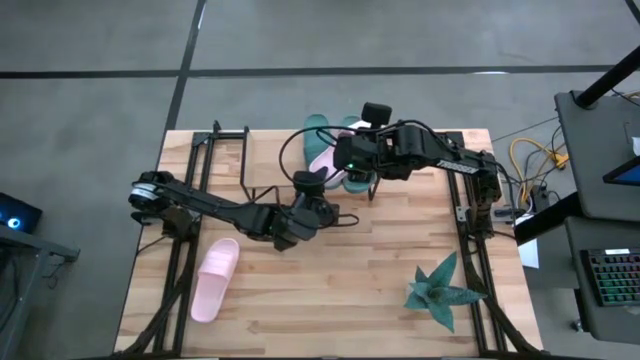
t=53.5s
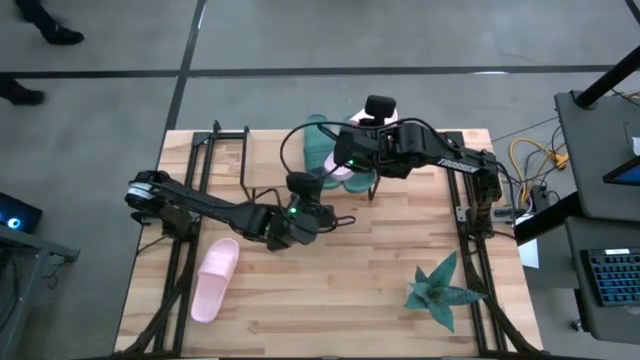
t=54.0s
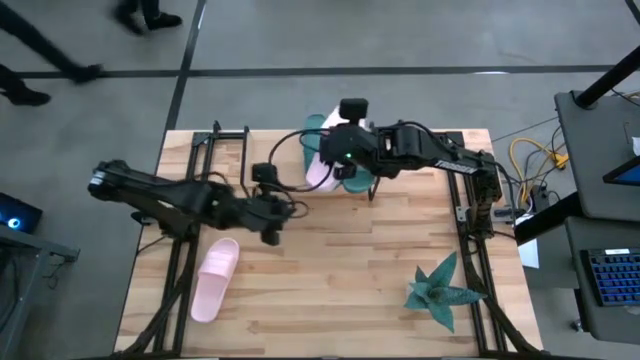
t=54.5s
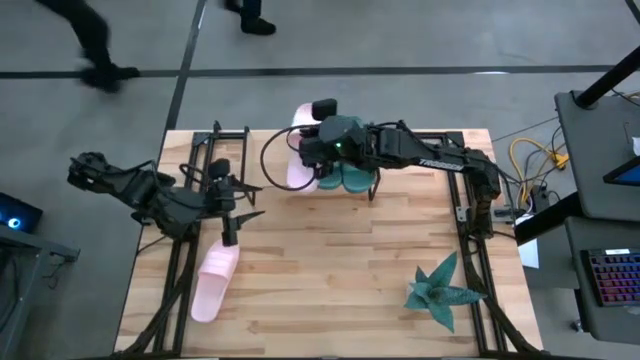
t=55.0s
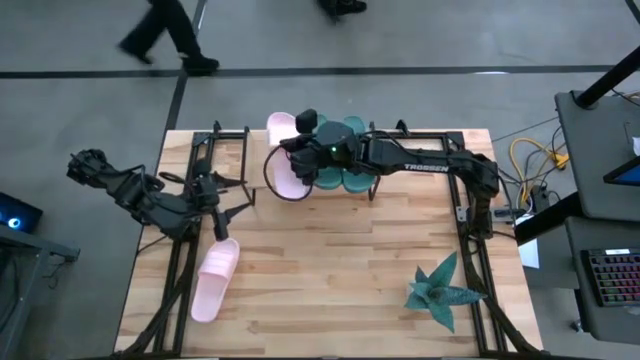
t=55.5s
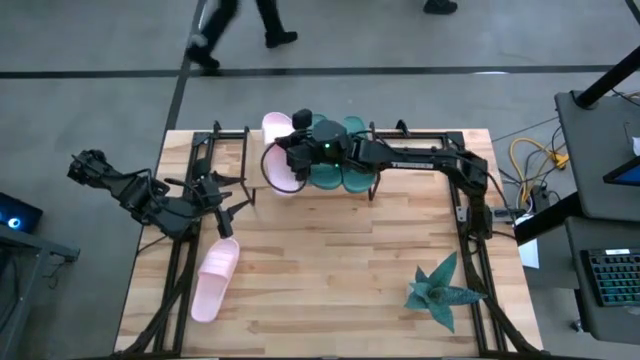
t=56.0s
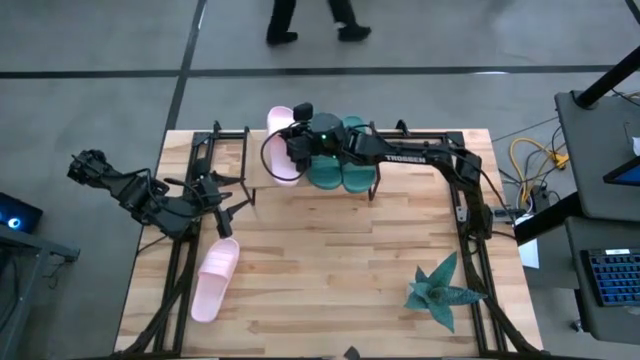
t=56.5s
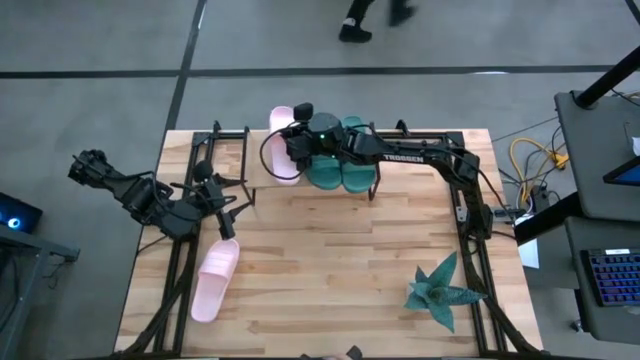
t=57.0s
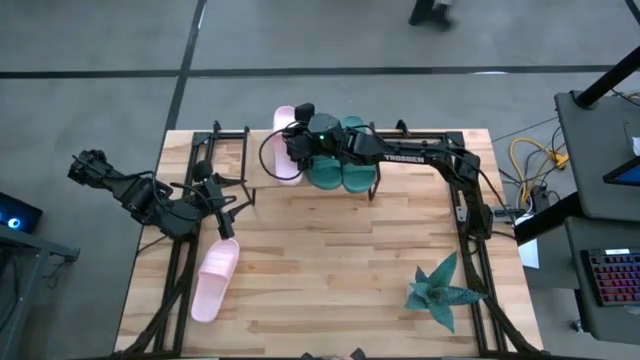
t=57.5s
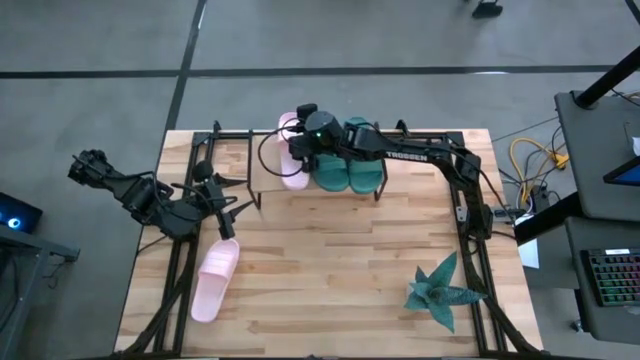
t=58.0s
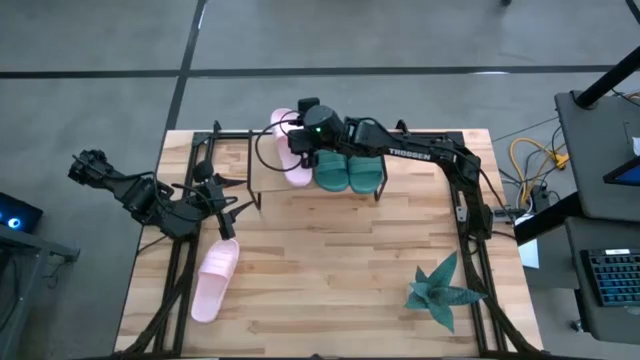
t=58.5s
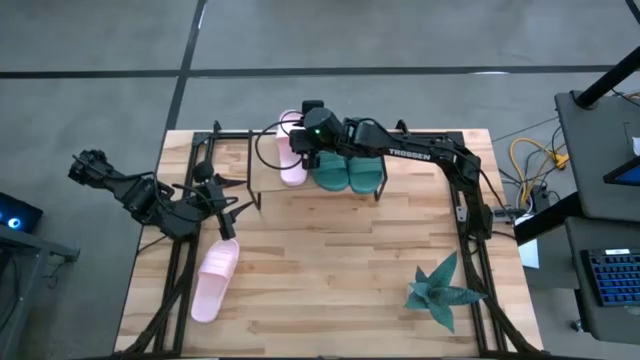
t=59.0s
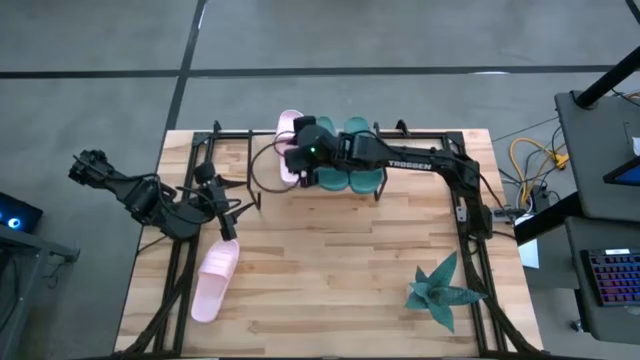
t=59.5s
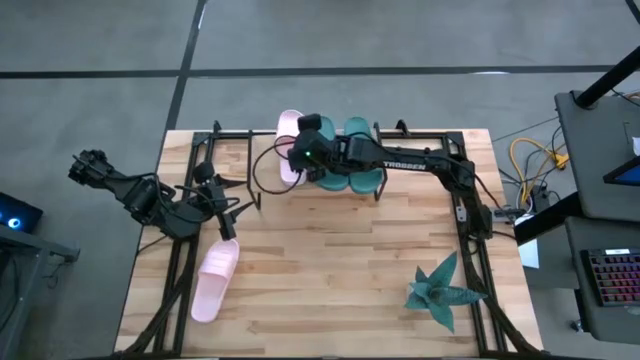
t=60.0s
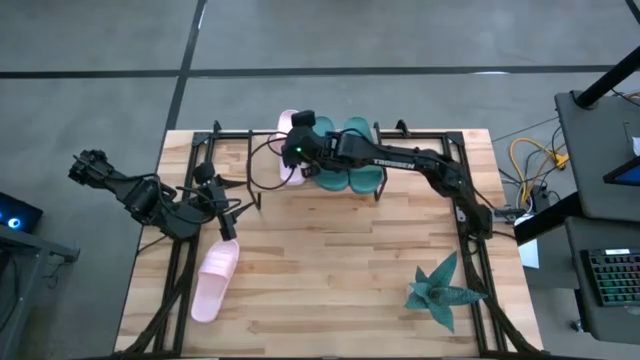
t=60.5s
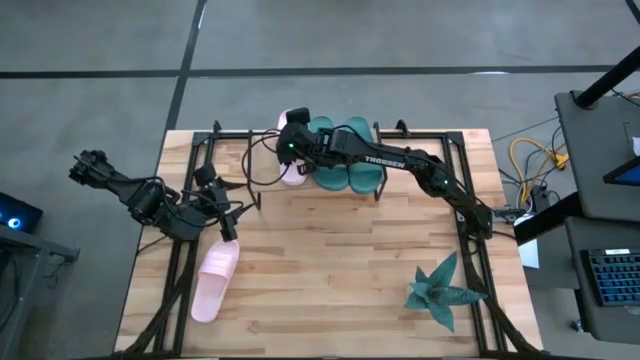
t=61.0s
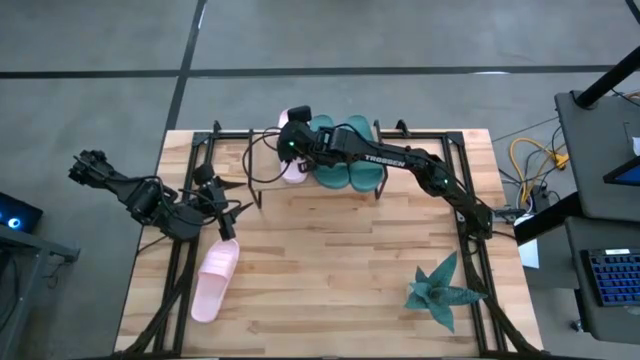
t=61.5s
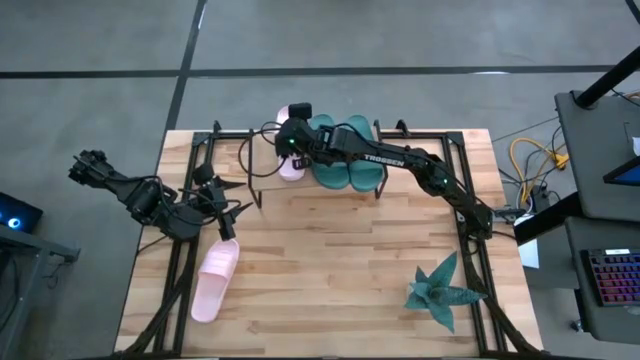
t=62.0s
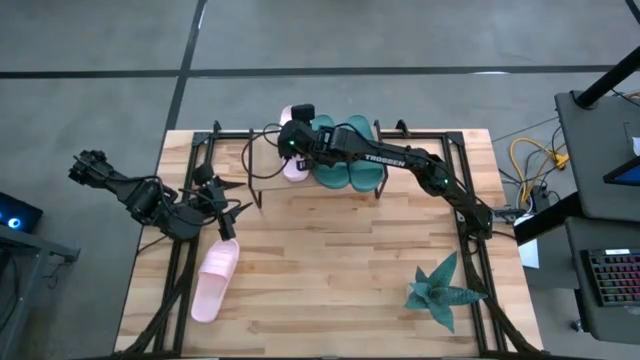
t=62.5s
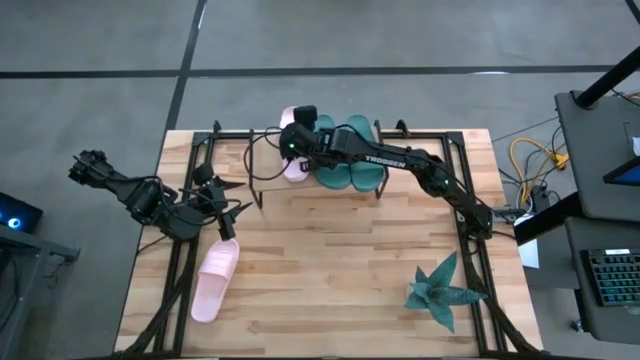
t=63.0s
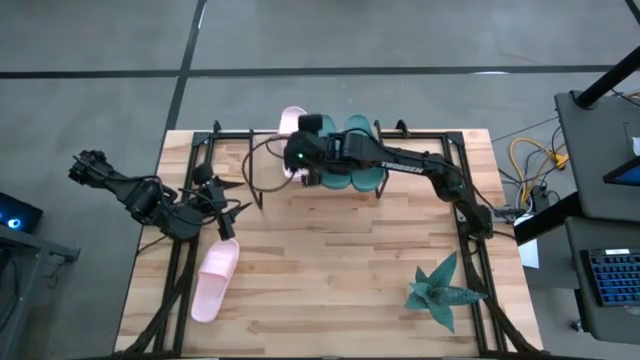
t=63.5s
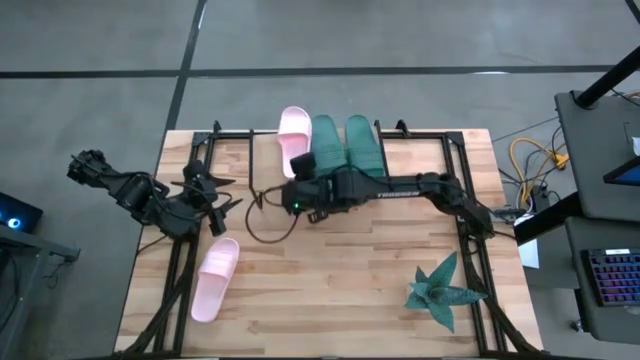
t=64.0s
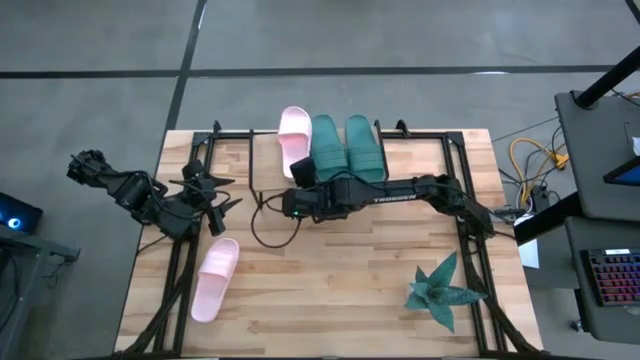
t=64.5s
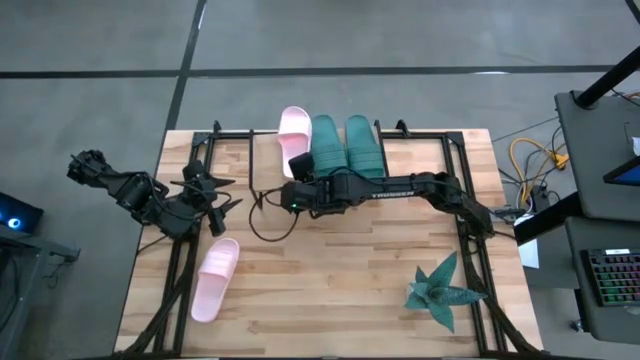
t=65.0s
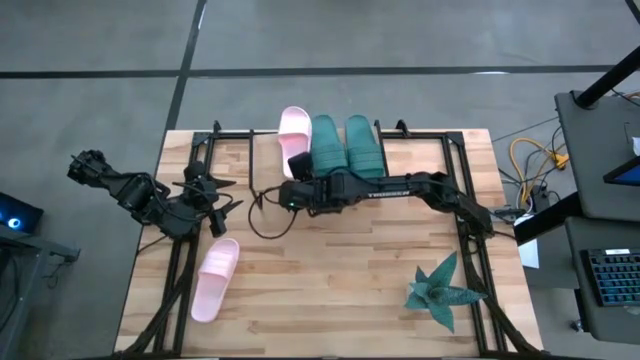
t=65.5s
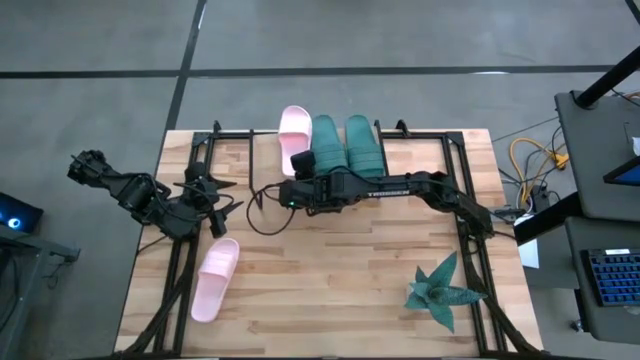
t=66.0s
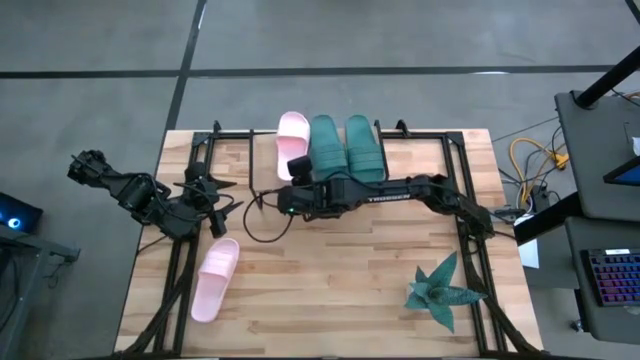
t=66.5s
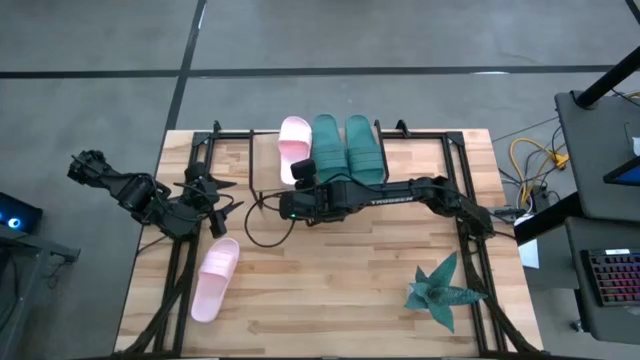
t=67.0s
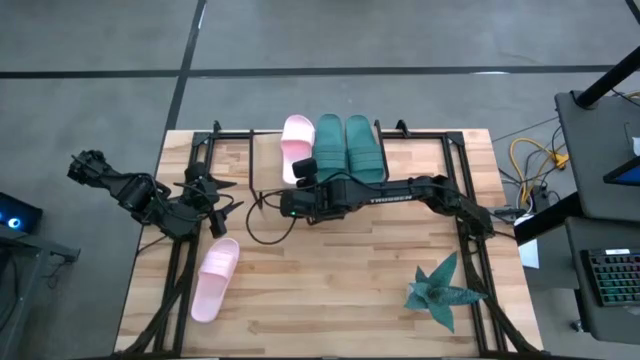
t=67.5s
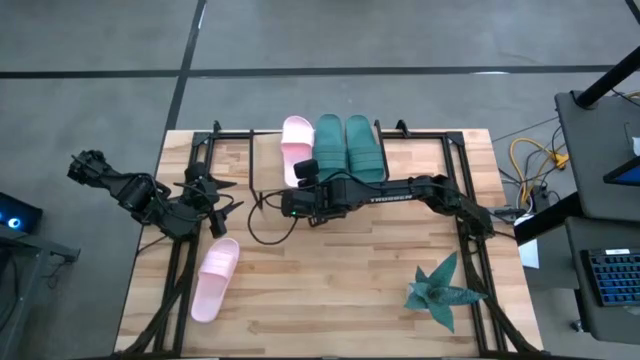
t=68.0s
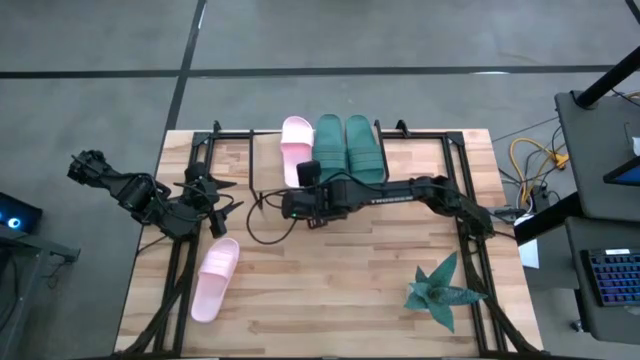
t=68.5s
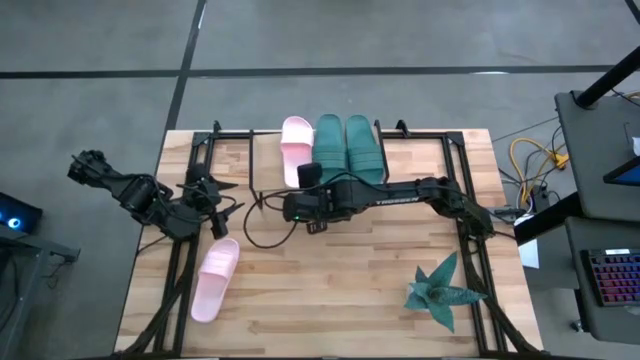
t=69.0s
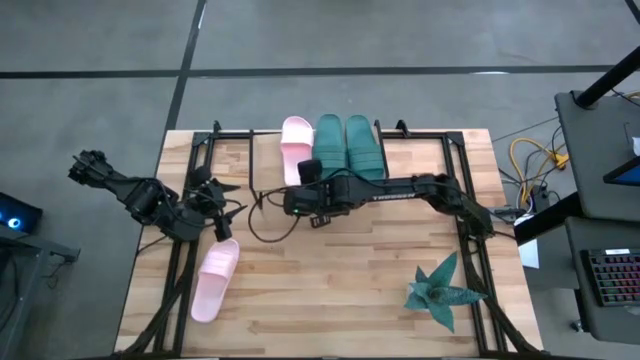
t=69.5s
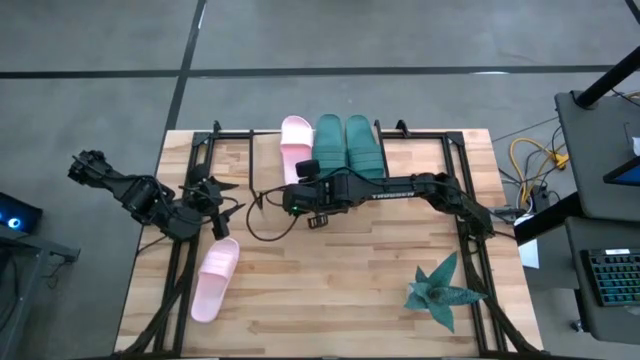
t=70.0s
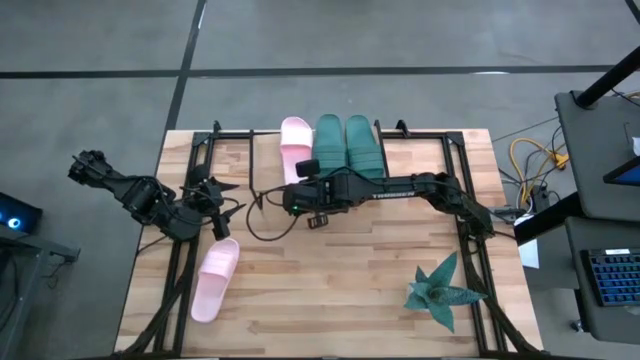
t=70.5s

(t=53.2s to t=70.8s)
Task: Pick and place slides into the shelf
Put the top pink slipper on the shelf

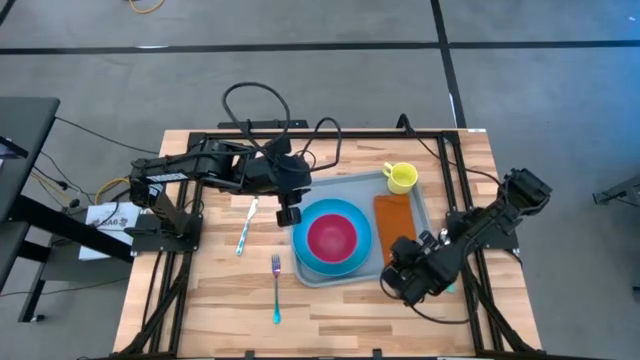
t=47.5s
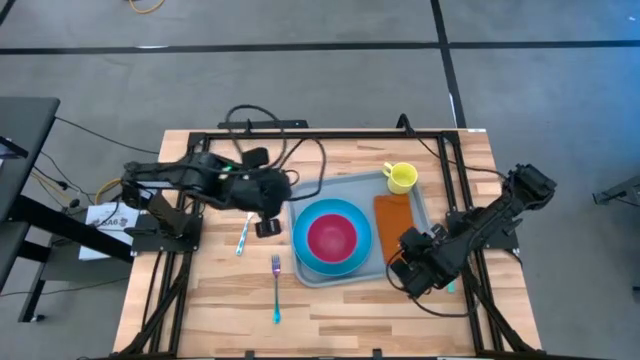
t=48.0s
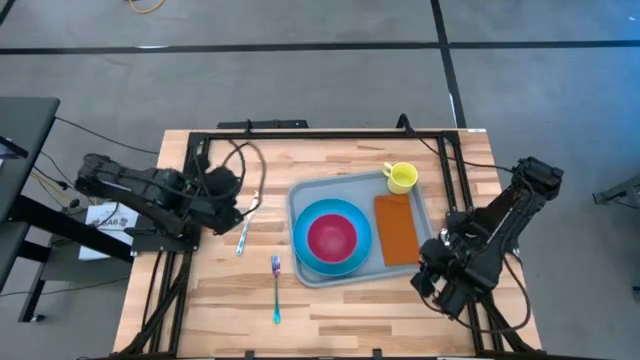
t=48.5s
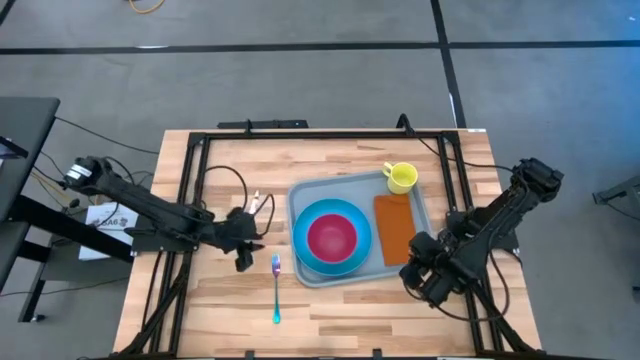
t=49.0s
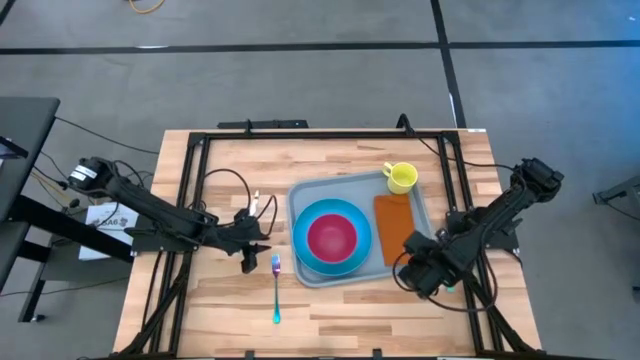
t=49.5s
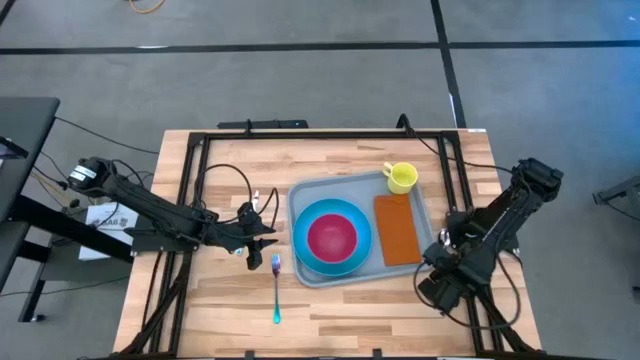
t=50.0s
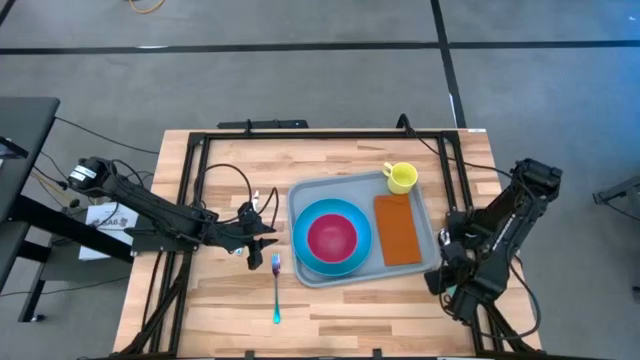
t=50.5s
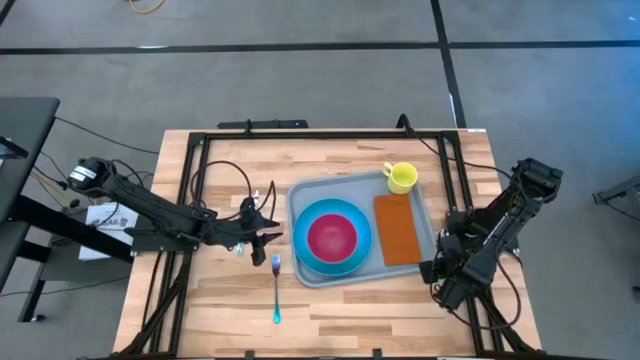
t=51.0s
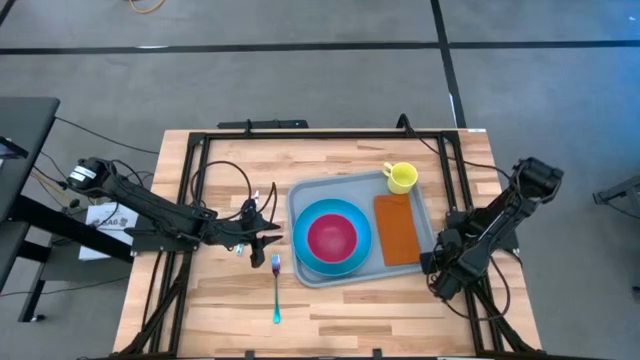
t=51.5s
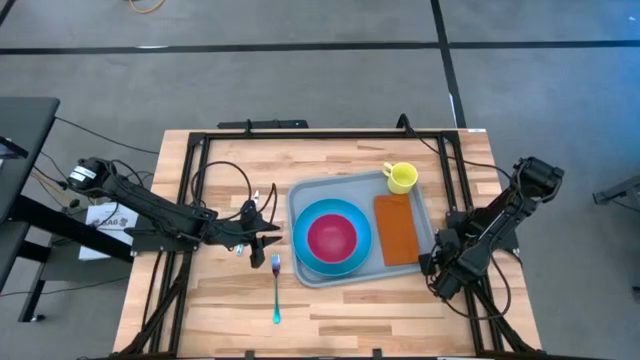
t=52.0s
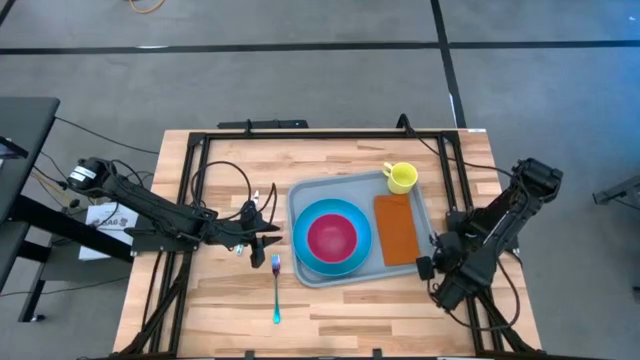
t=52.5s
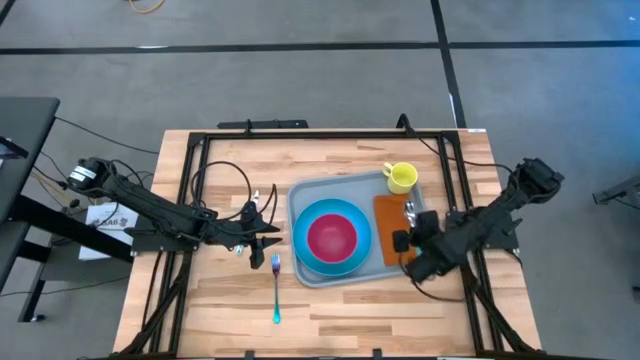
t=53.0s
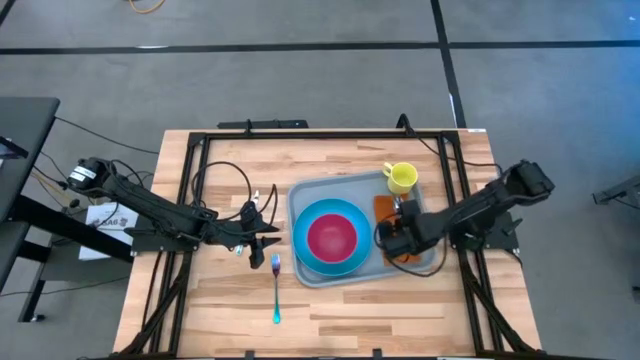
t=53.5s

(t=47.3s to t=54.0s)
Task: Set up tray
Put the green spoon on the brown napkin to the right of the blue plate
